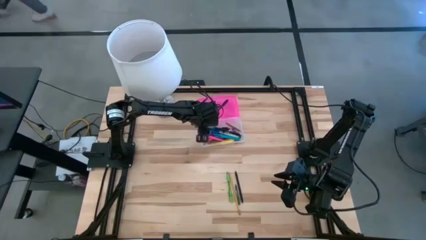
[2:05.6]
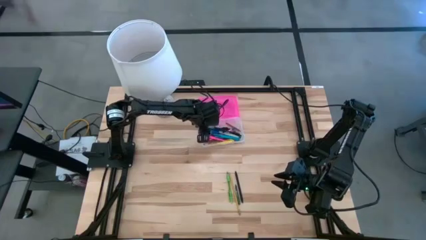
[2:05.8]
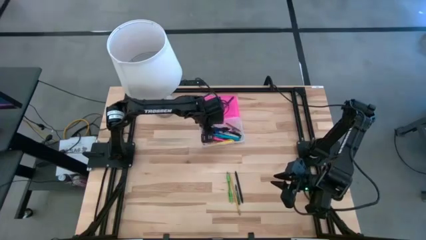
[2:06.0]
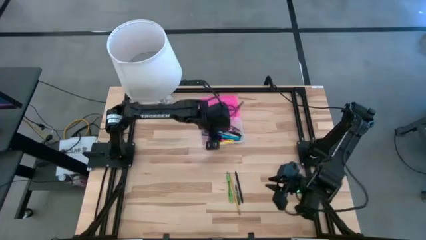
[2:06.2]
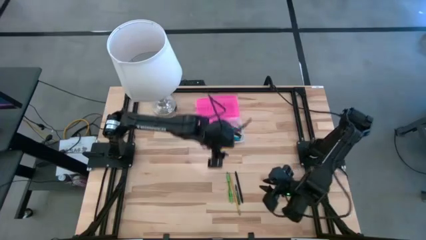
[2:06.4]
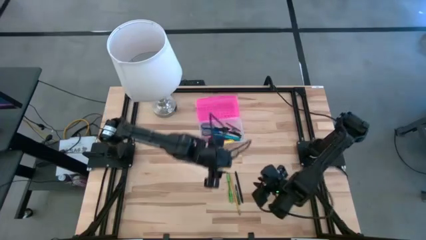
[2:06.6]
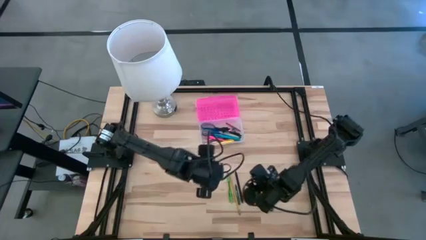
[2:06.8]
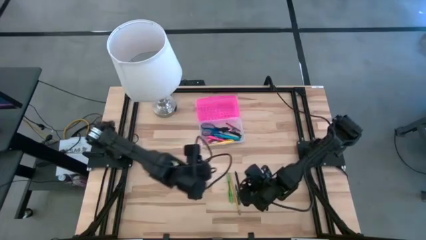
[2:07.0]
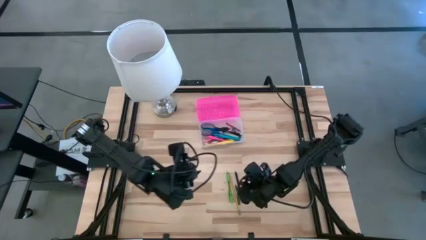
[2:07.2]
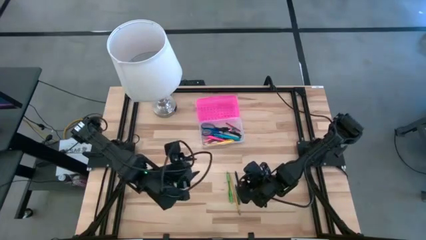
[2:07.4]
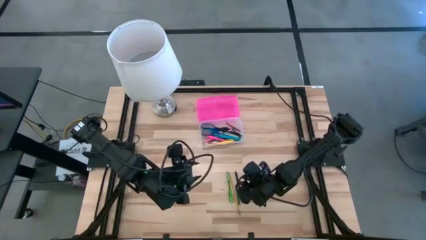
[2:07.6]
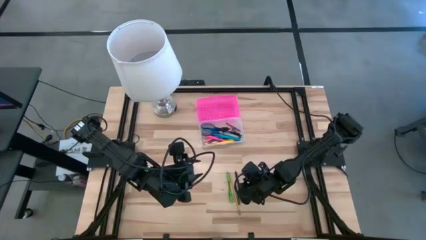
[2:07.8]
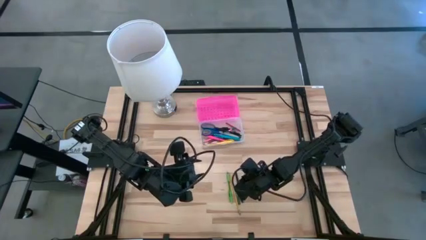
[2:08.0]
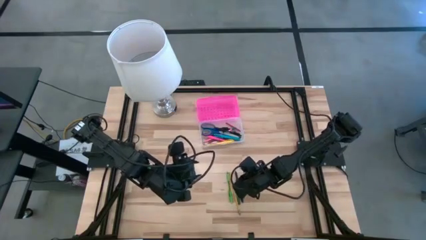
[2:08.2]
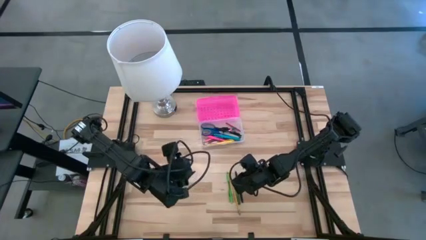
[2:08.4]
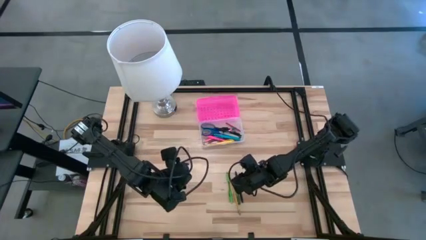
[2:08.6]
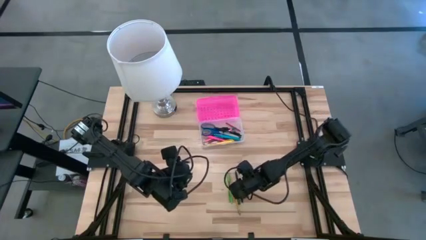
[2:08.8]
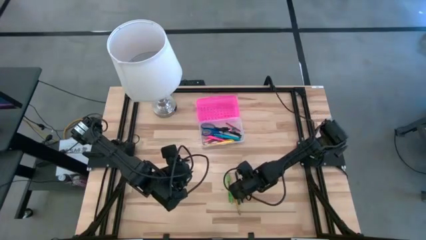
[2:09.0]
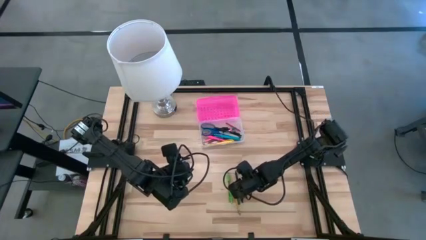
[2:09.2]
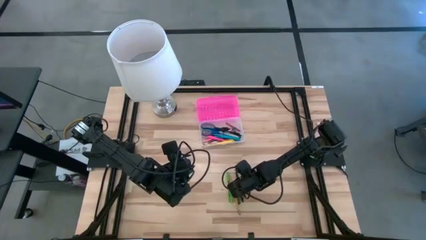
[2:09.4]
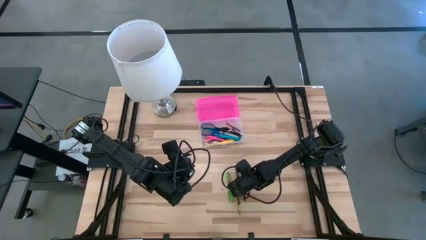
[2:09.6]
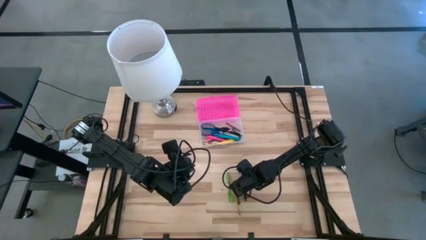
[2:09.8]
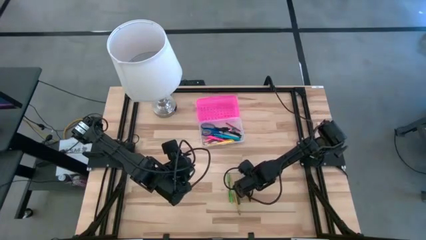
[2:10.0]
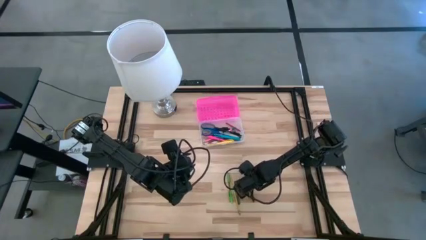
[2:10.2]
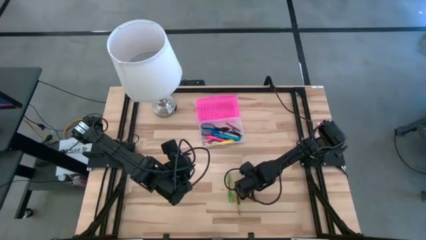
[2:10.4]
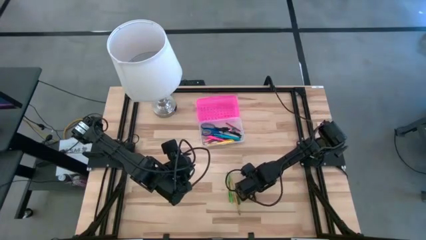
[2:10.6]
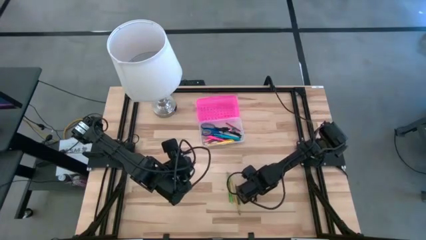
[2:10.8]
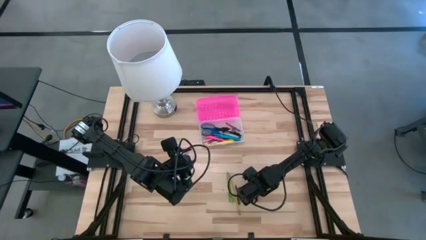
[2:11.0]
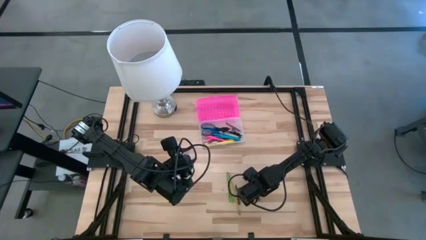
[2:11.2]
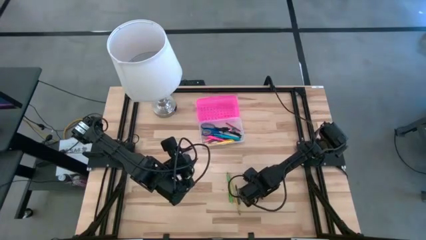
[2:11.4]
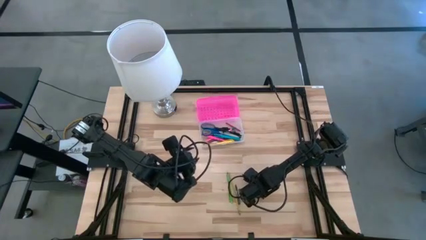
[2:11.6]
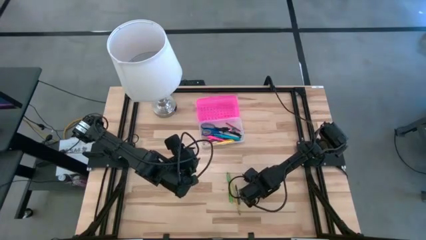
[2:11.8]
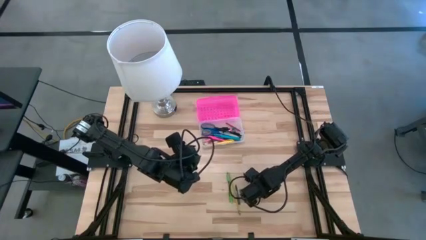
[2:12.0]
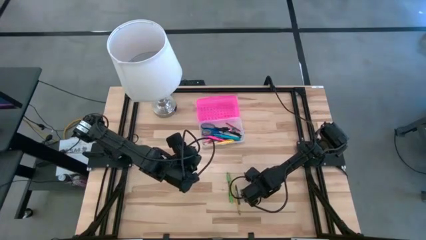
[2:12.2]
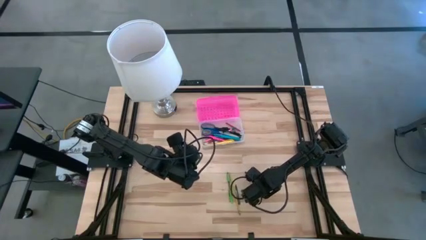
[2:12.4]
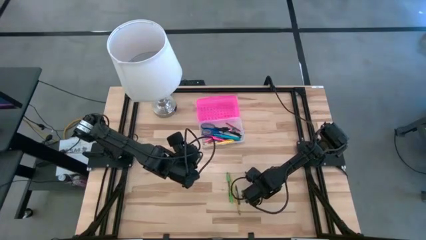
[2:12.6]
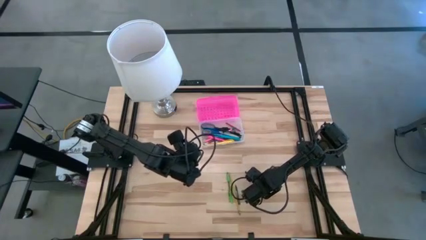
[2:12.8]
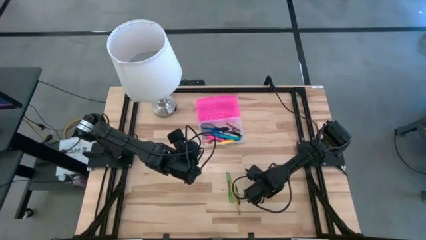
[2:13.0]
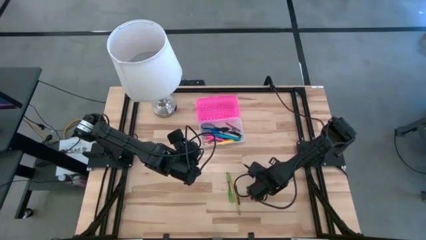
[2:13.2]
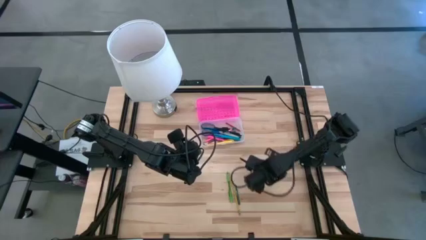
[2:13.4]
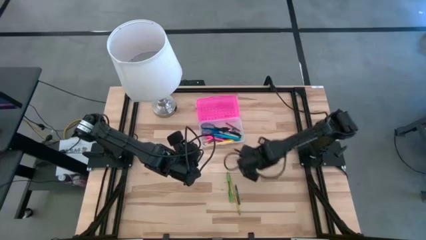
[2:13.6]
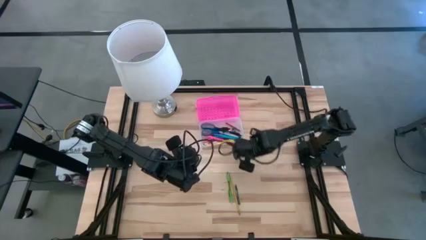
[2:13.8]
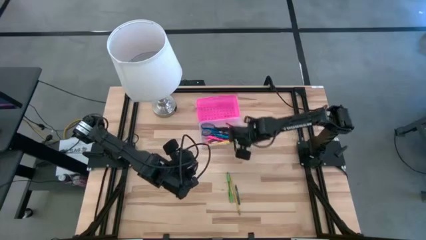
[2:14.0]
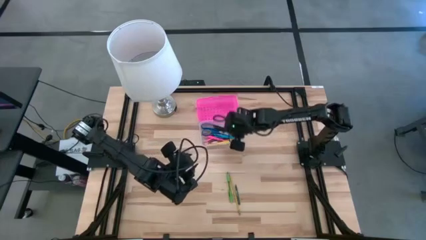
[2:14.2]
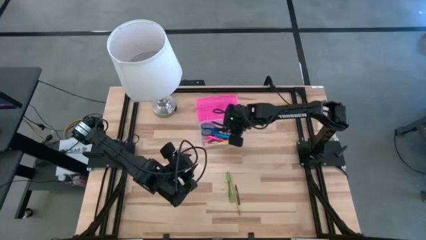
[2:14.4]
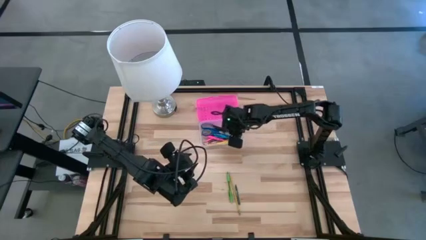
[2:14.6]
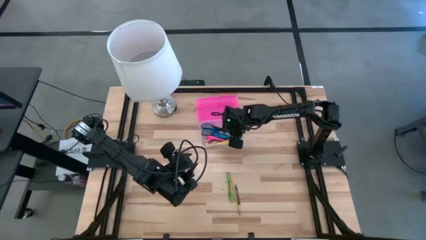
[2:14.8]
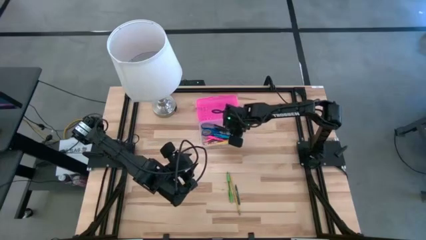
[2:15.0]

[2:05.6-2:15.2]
Task: Pick & place school supplies into a supply box
Put the black pen into the pink supply box
